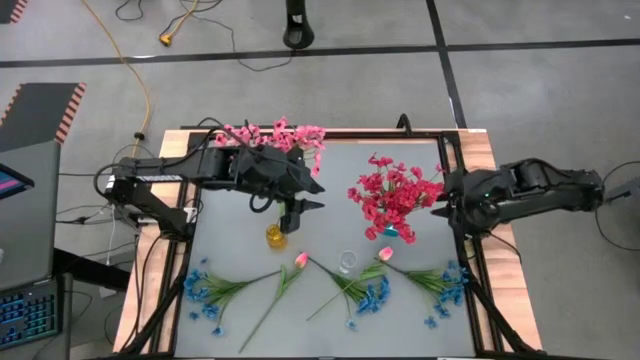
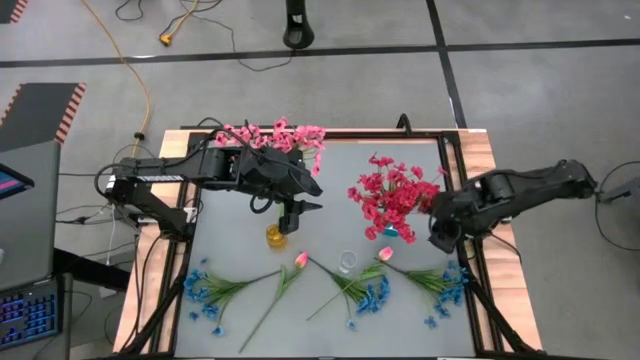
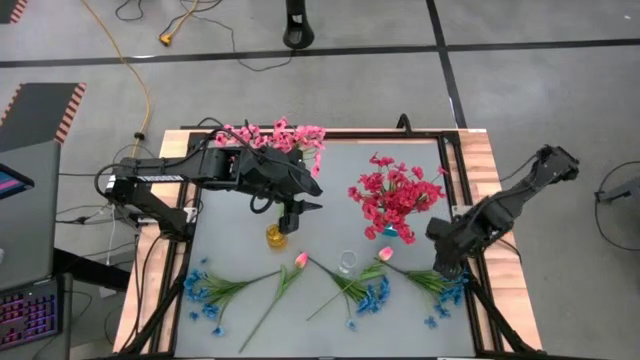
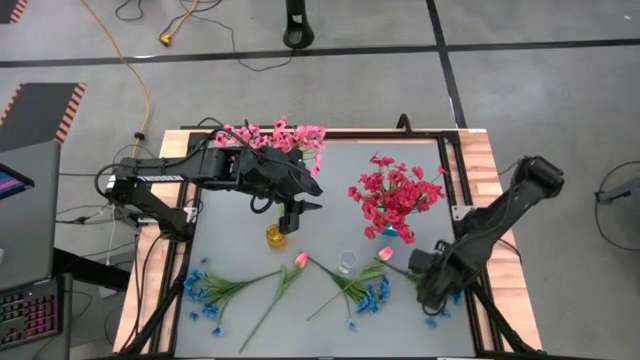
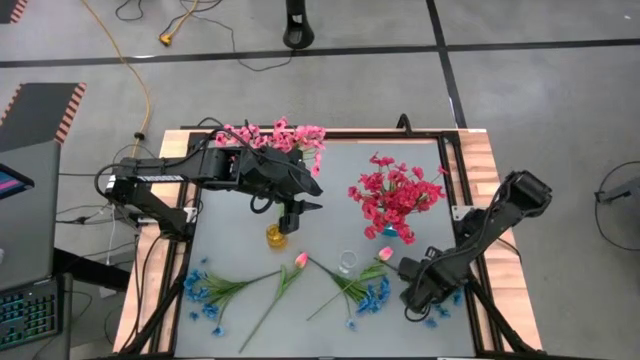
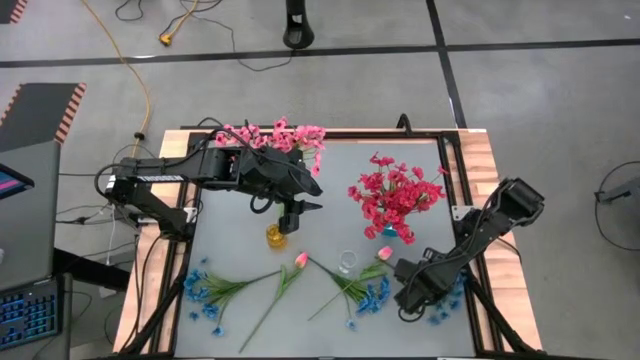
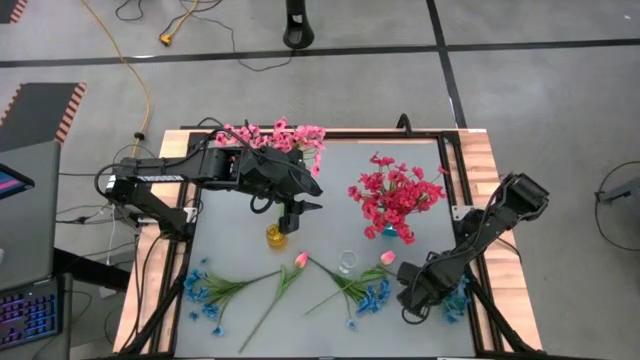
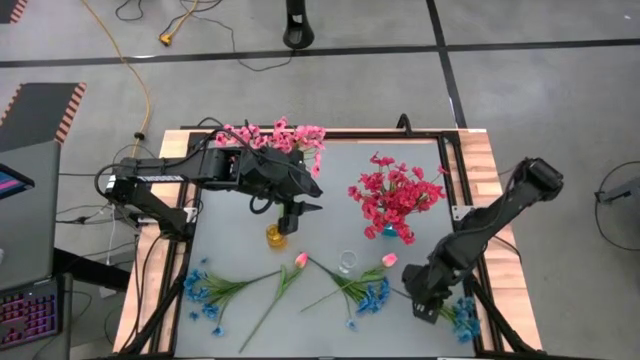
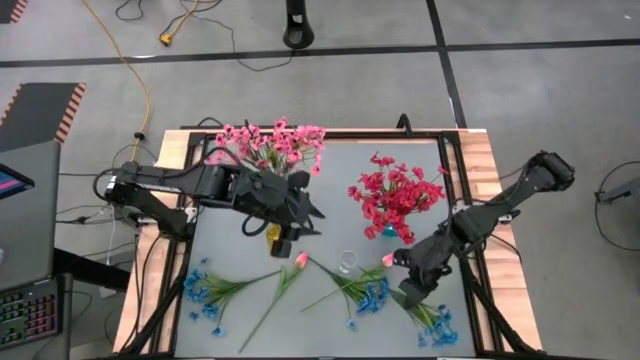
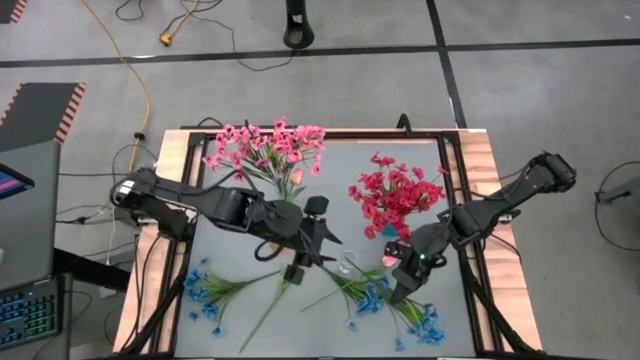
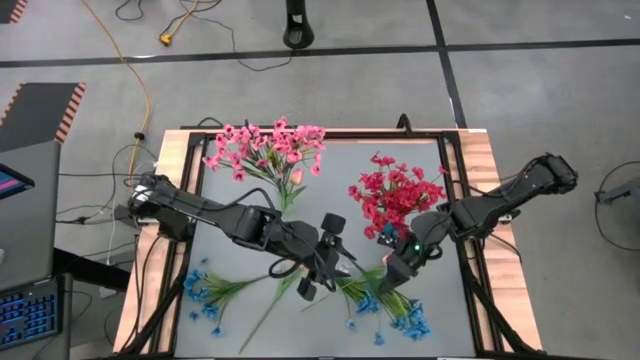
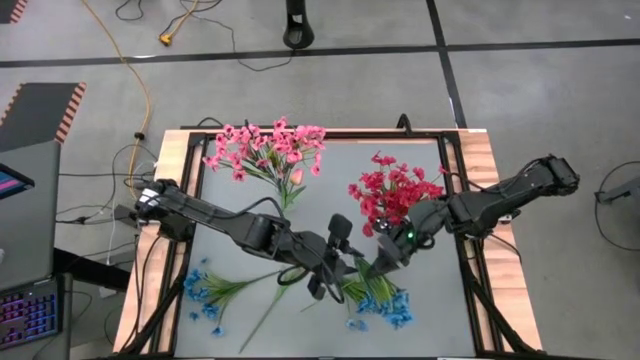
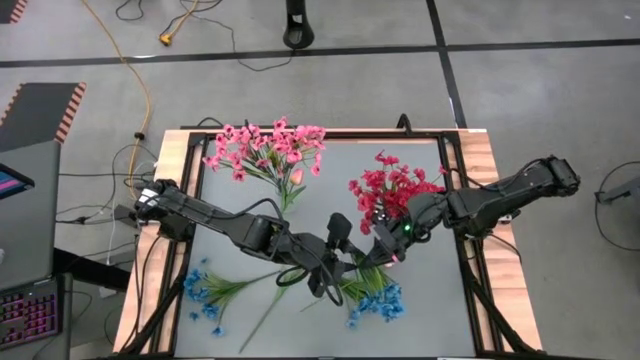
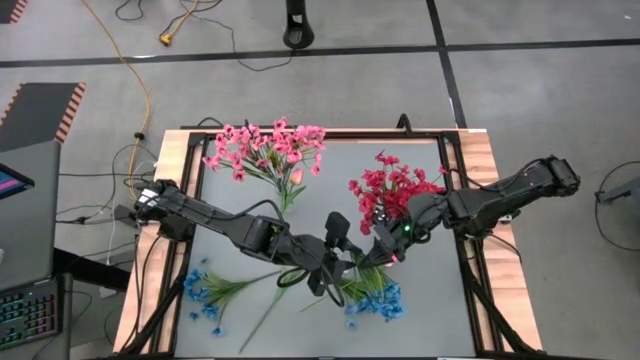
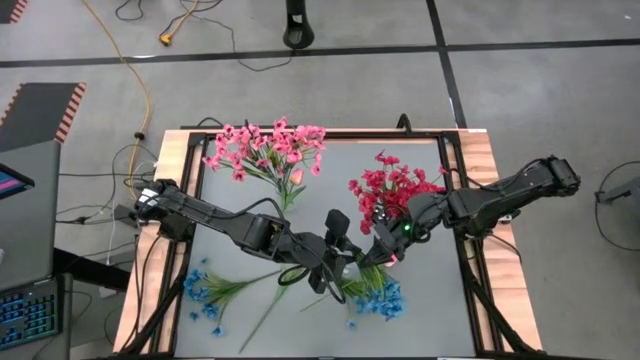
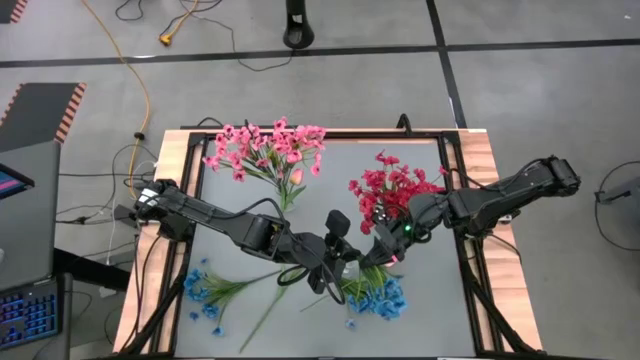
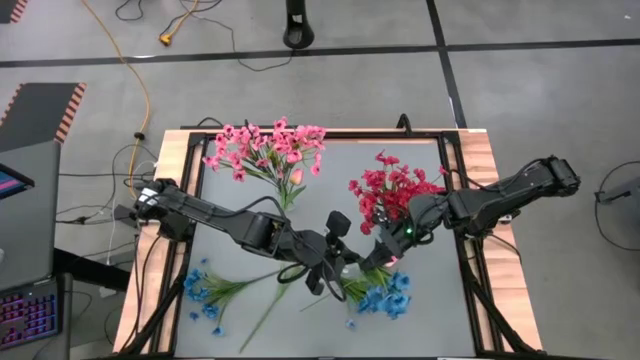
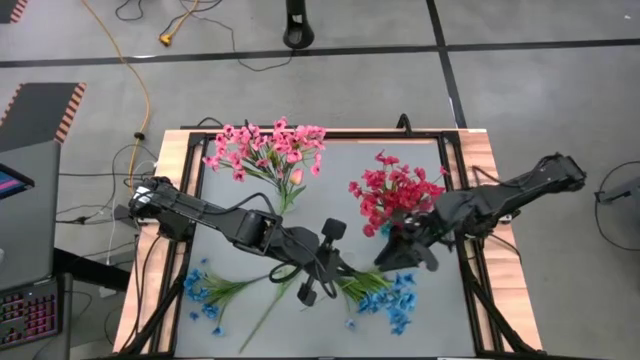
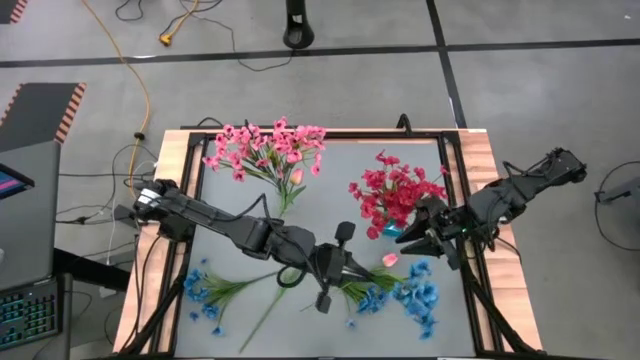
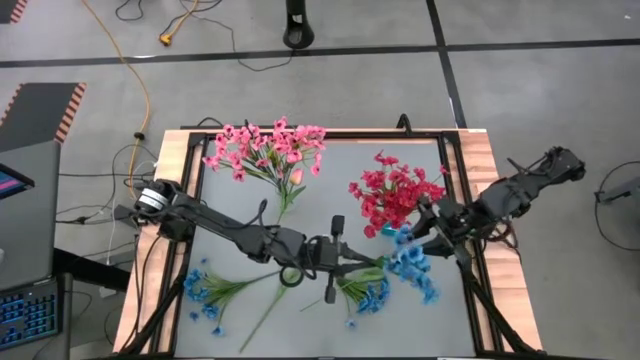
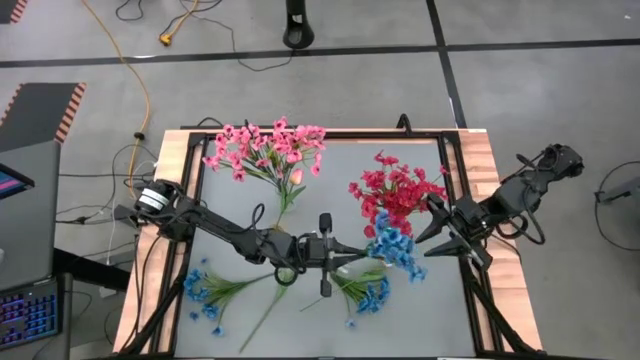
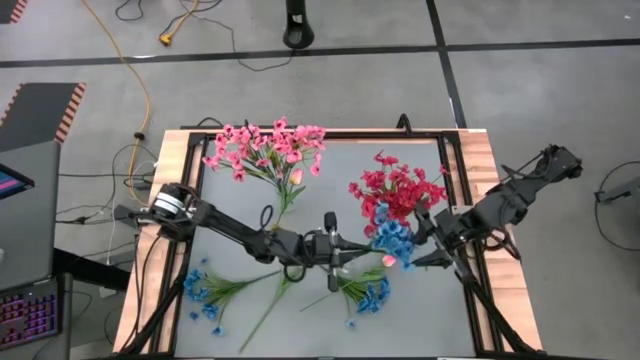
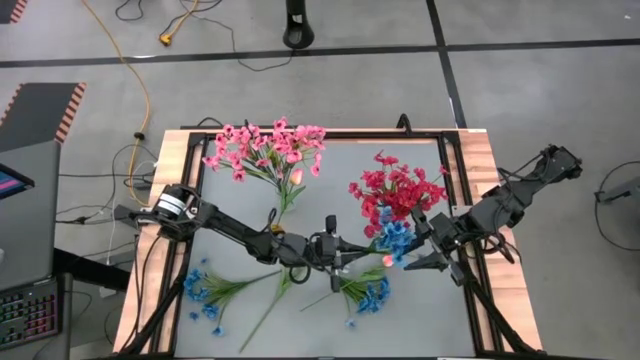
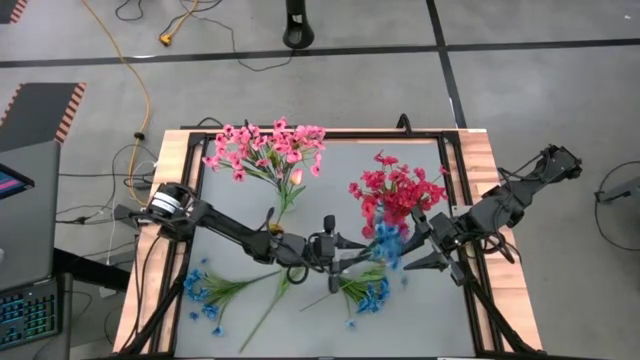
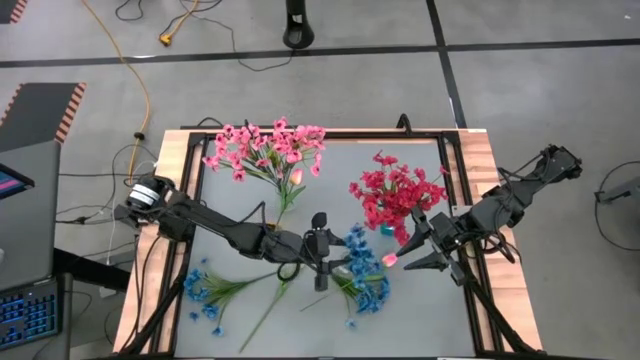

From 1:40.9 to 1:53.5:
Task: Sort flowers into vase by color
Put the right blue flowers into the bottom transparent vase

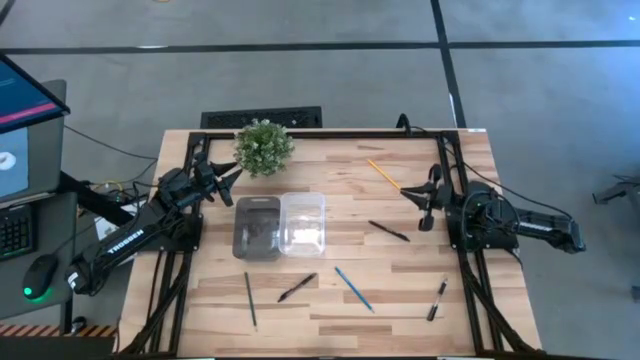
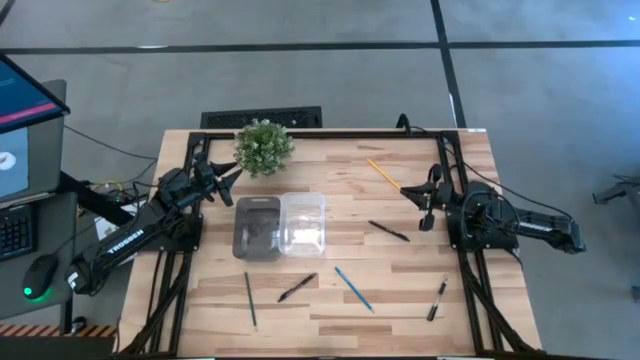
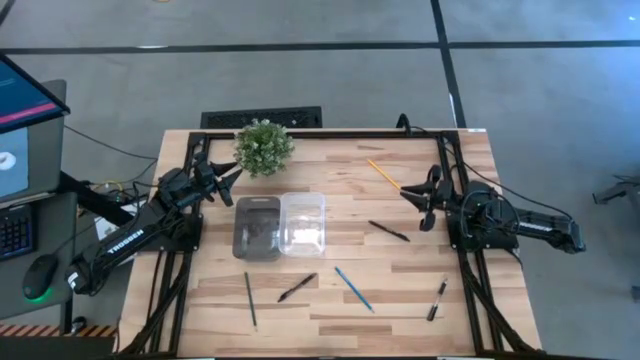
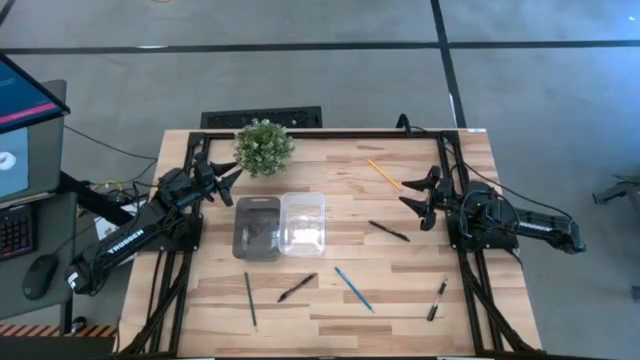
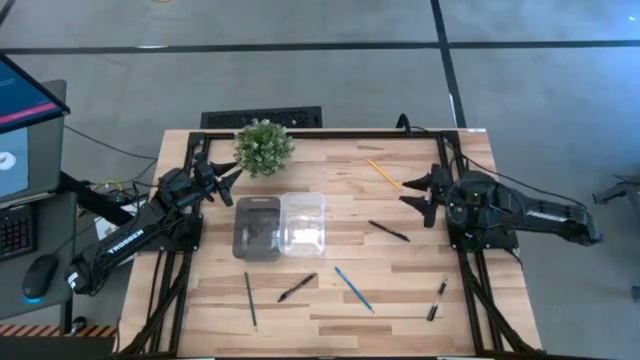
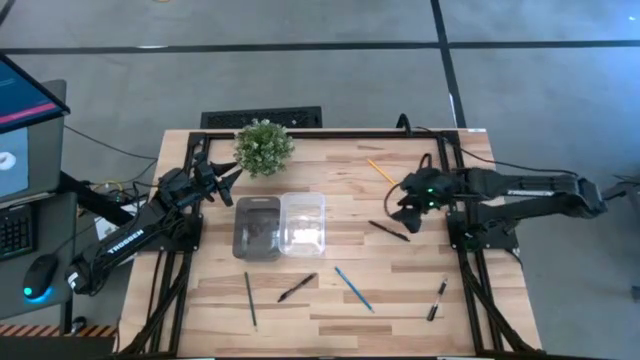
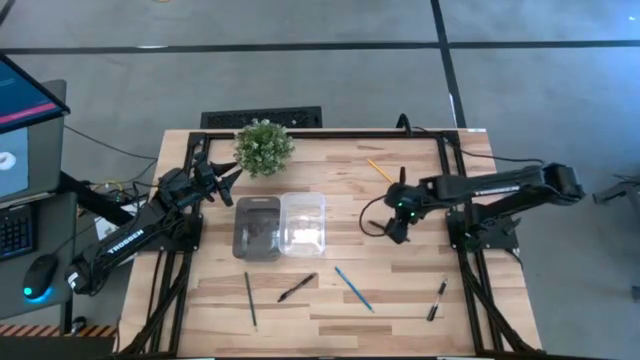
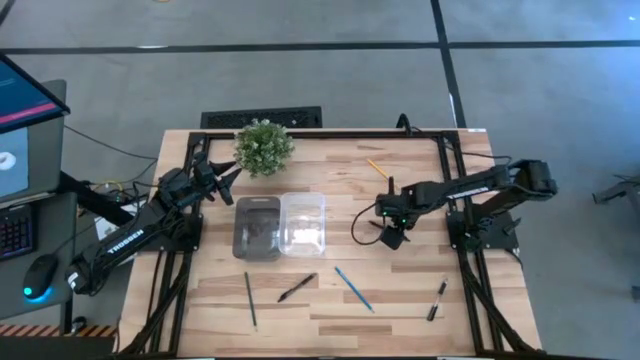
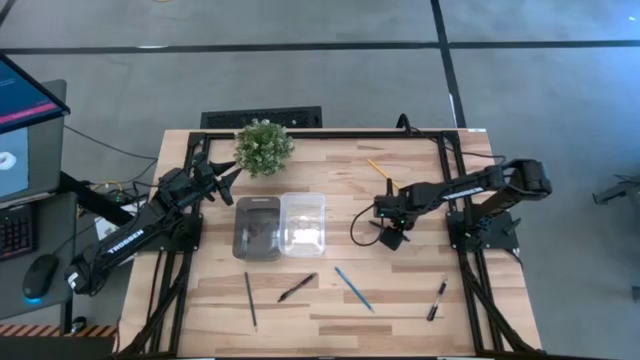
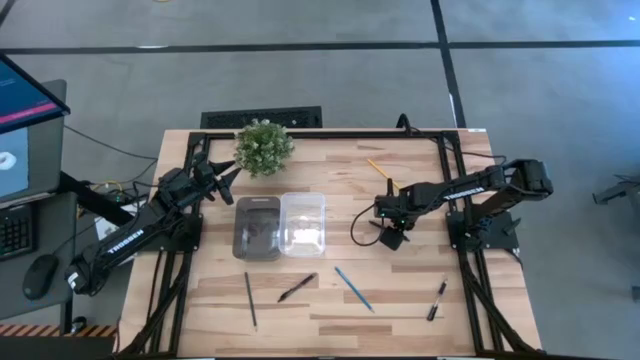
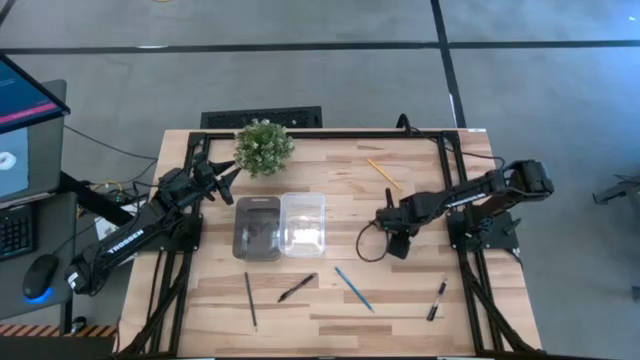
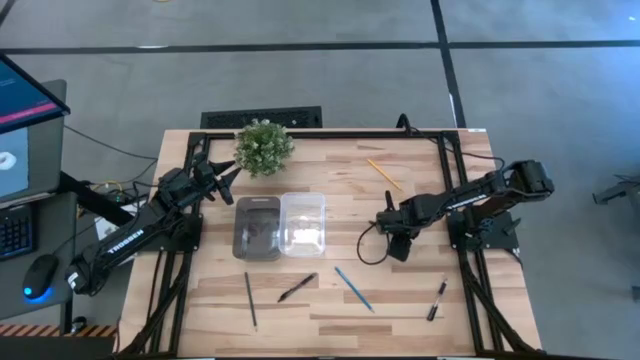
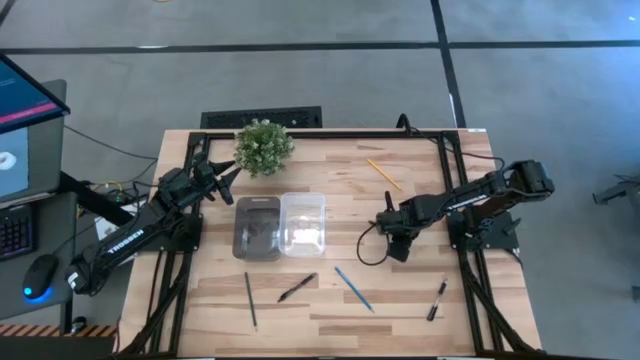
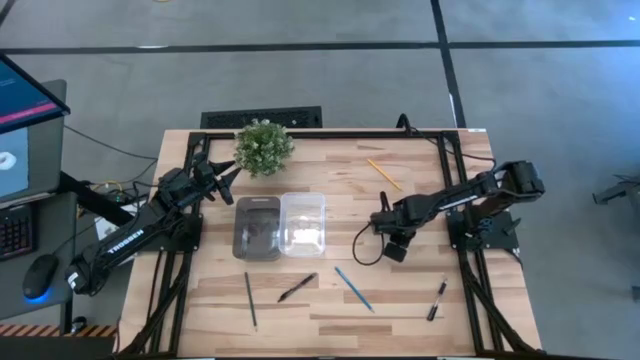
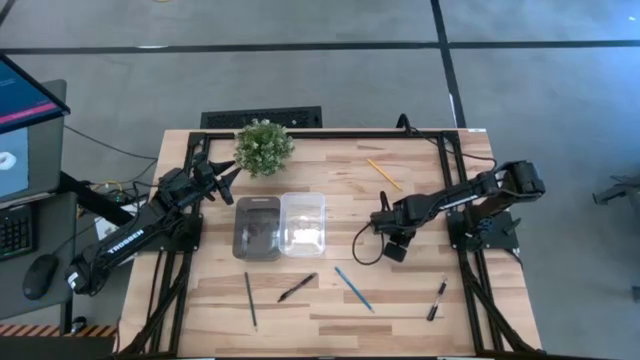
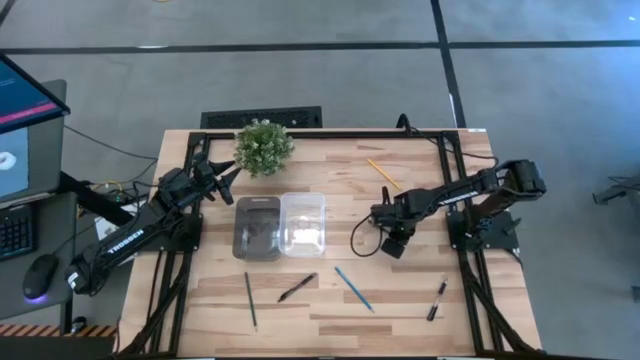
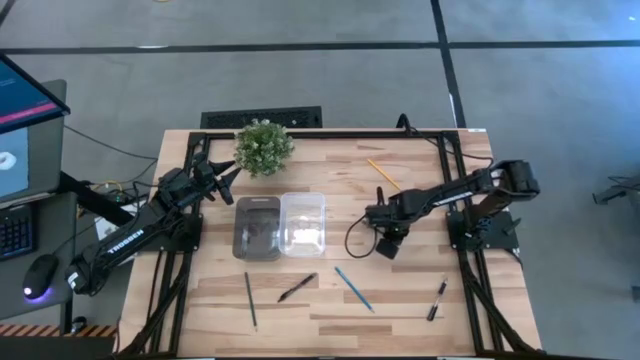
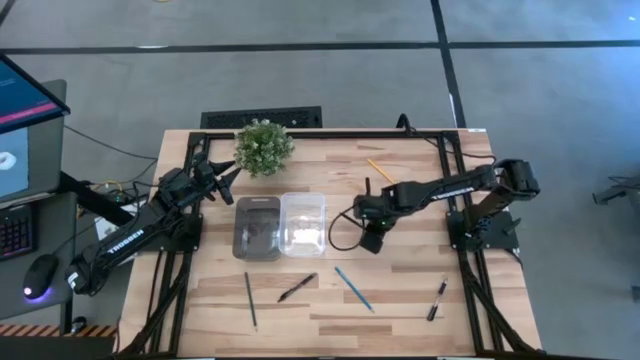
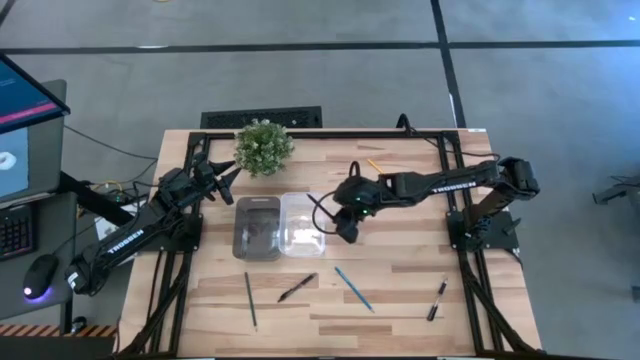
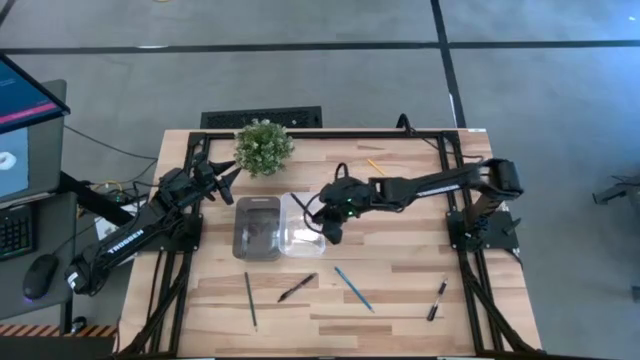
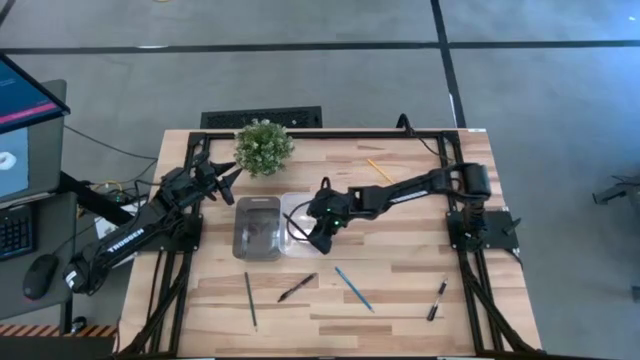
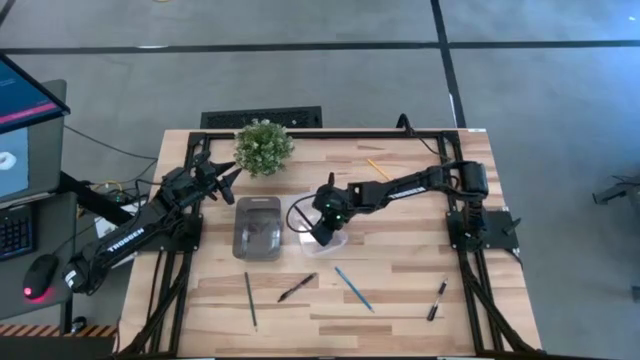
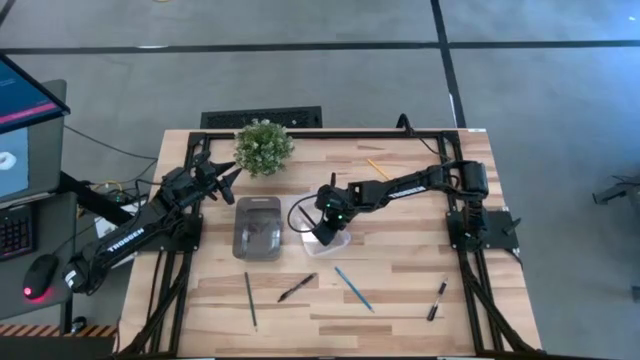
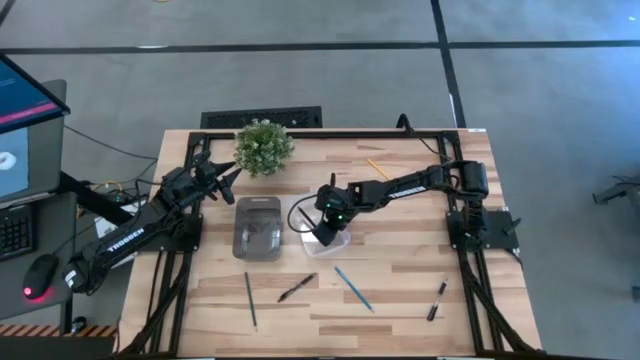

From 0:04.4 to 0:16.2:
Task: Sort pens & pencils
Put the black pen into the transparent bin
